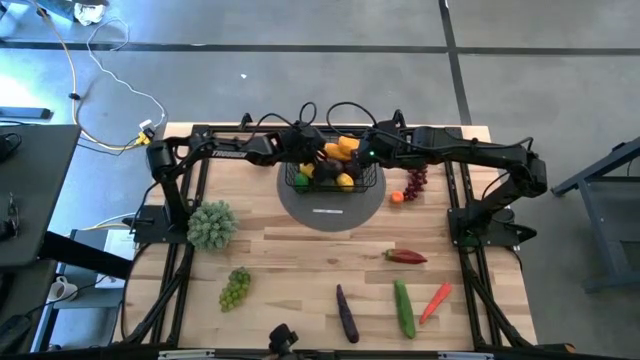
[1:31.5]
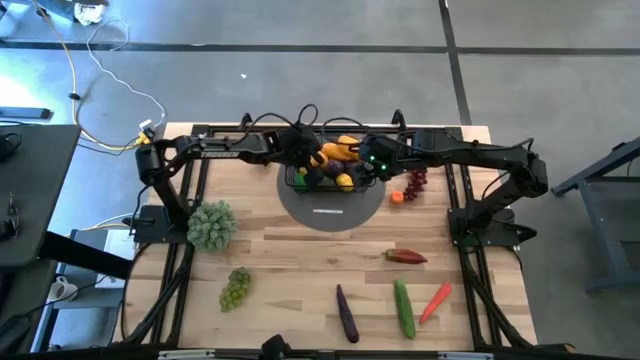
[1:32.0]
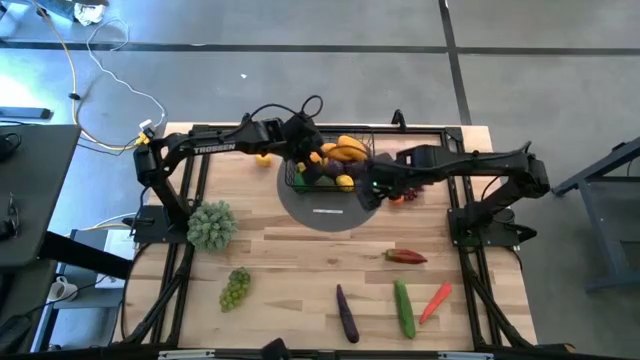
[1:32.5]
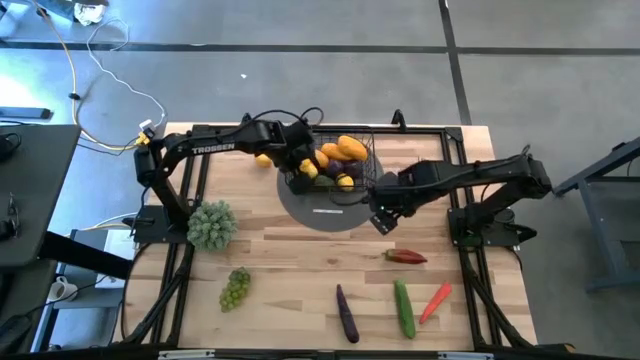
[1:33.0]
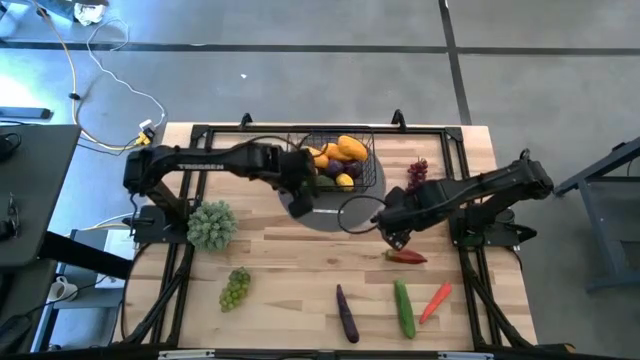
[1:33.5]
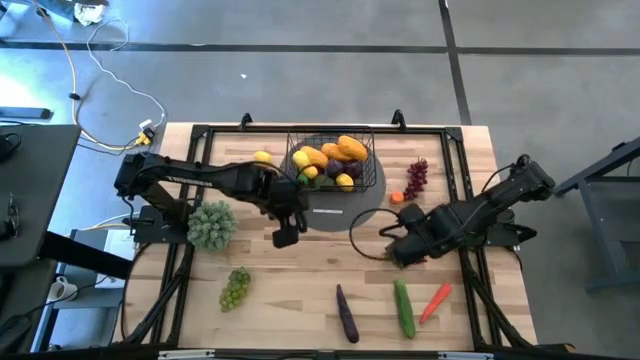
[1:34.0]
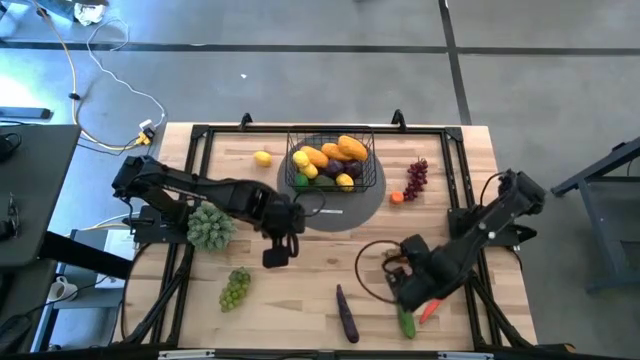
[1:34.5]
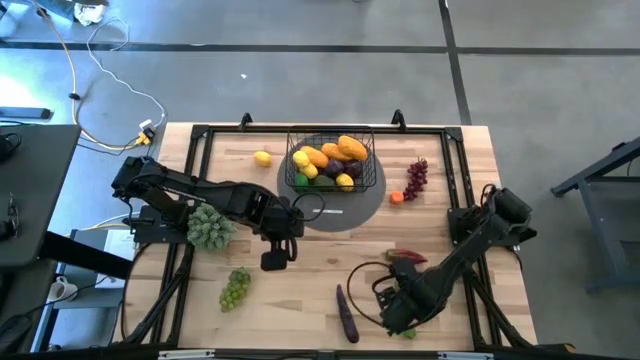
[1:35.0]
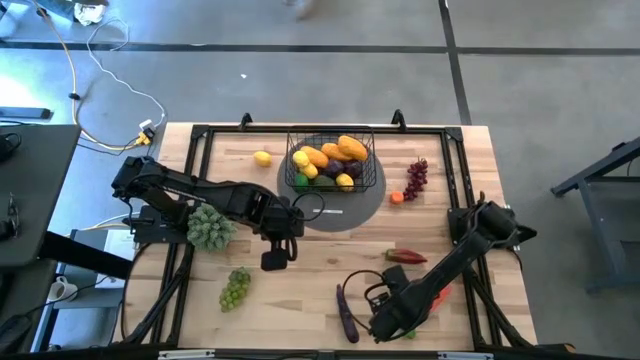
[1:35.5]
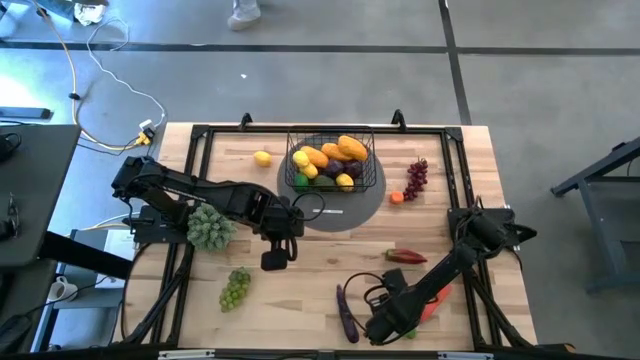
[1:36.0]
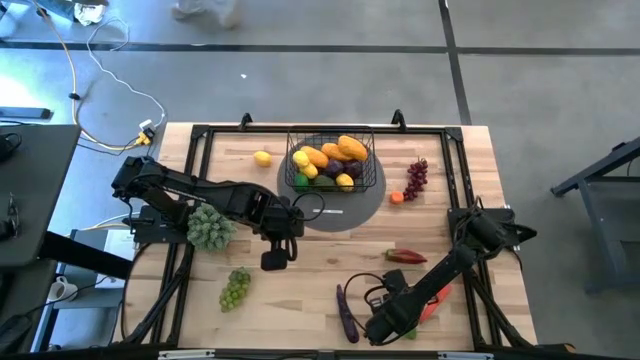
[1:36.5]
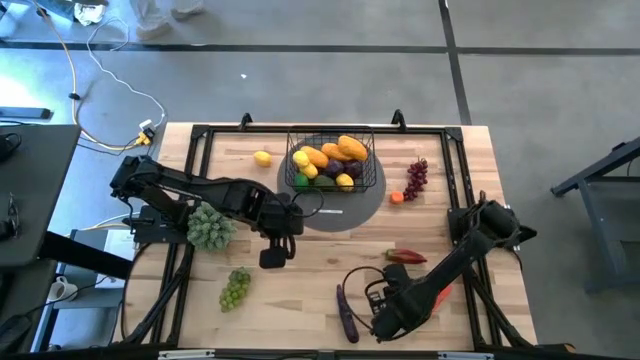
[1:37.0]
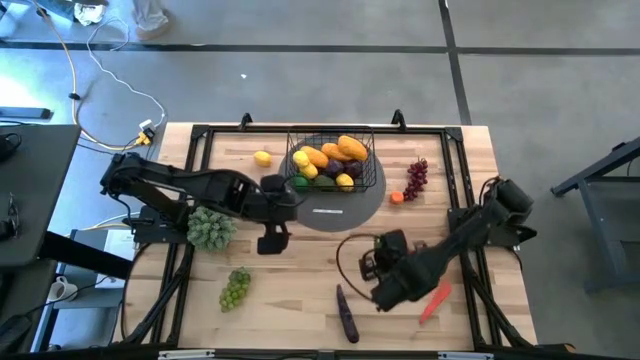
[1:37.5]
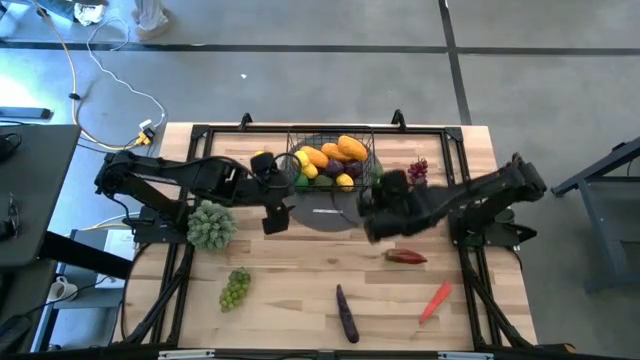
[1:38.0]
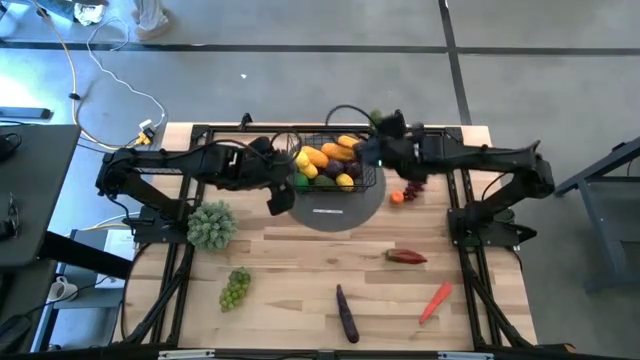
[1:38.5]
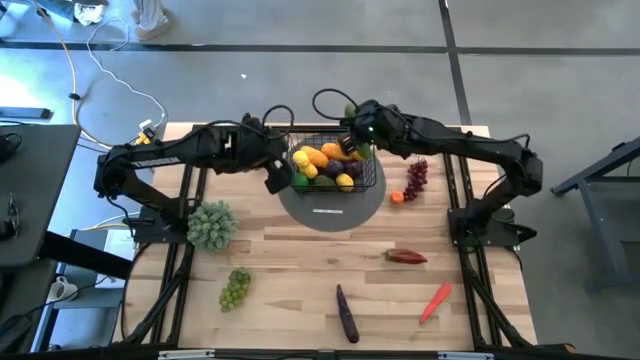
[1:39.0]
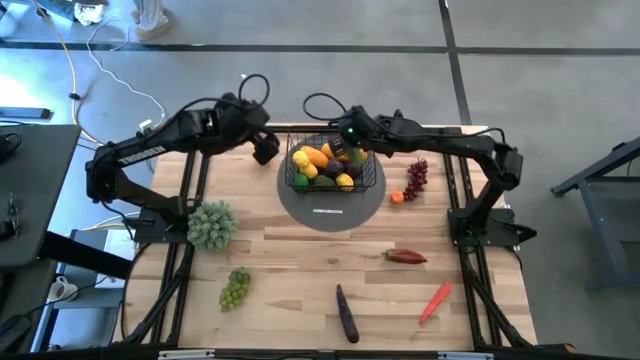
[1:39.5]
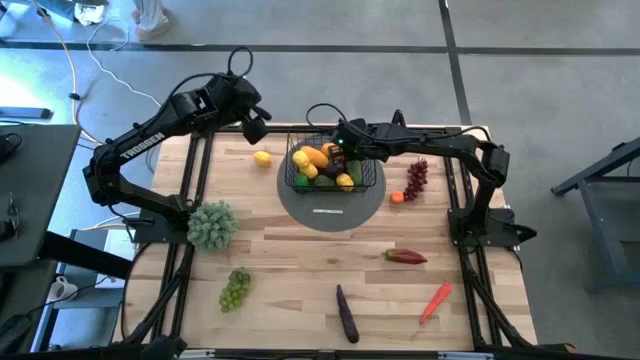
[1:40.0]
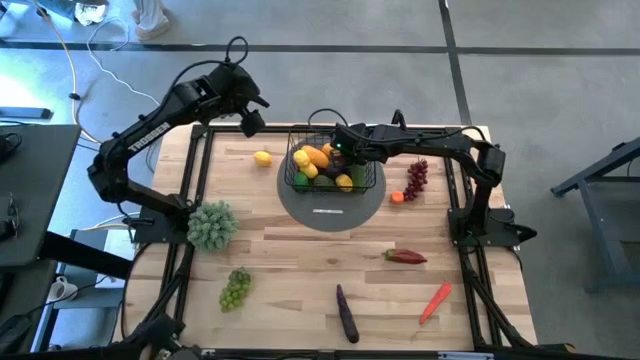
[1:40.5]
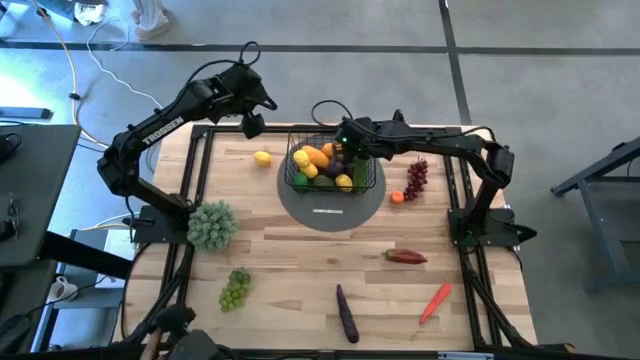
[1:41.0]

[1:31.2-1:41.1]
Task: Build produce basket
Put the green cucumber into the wire basket

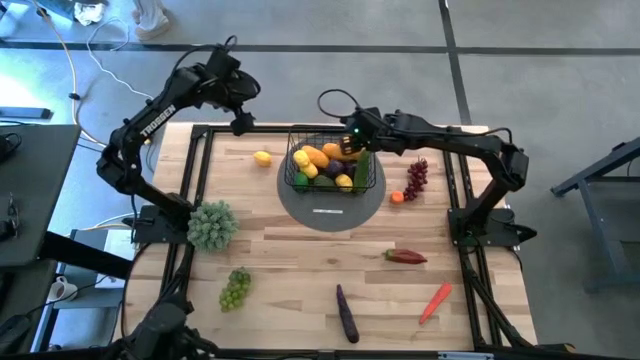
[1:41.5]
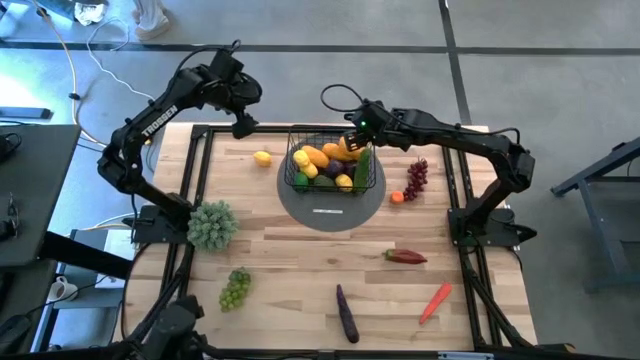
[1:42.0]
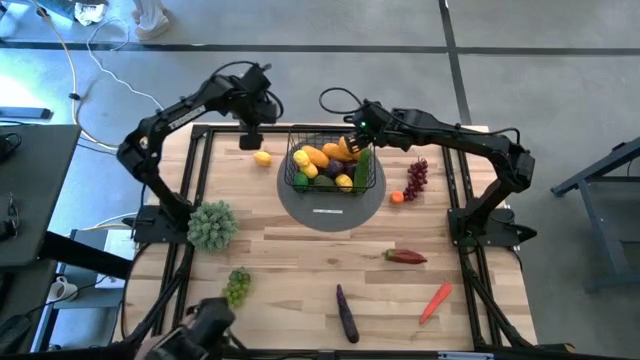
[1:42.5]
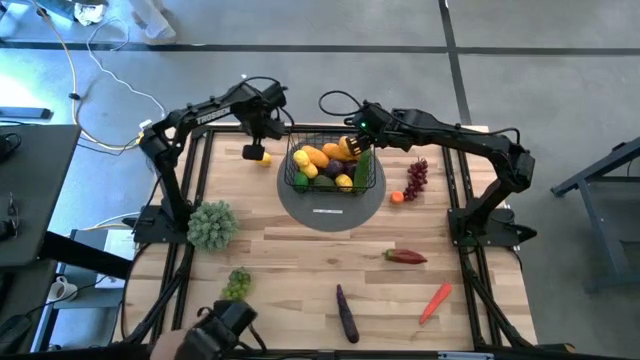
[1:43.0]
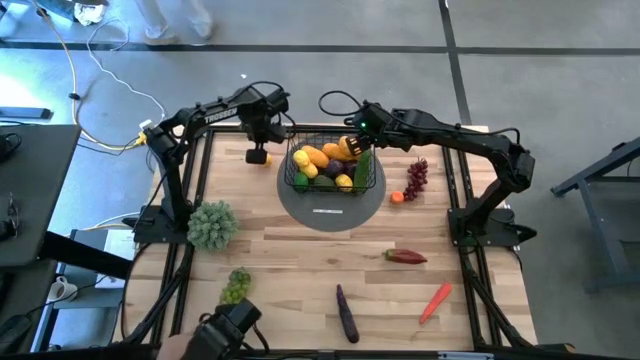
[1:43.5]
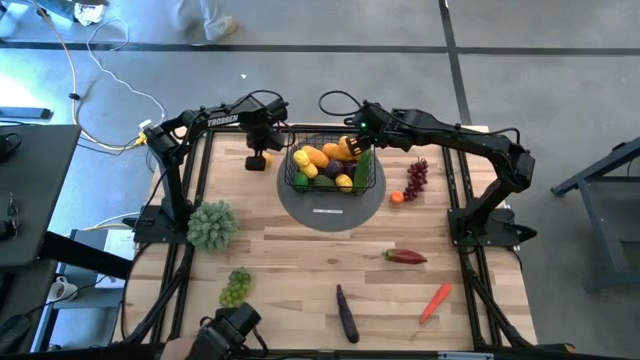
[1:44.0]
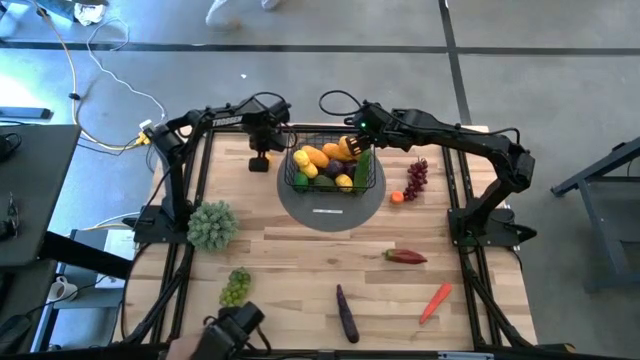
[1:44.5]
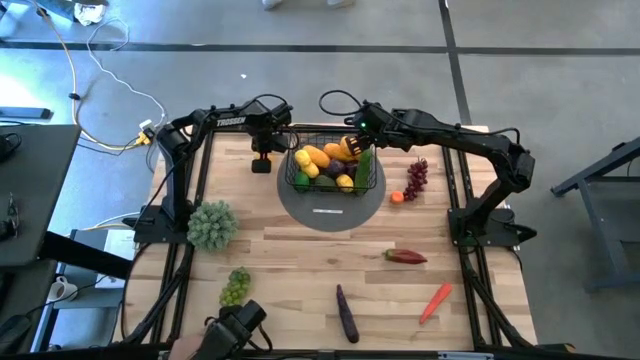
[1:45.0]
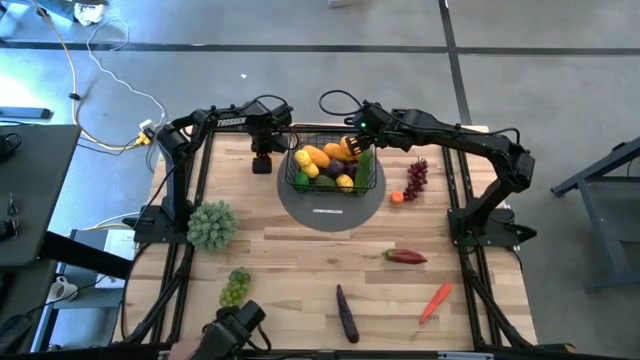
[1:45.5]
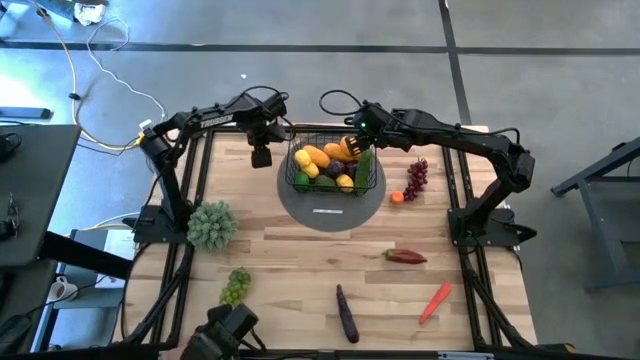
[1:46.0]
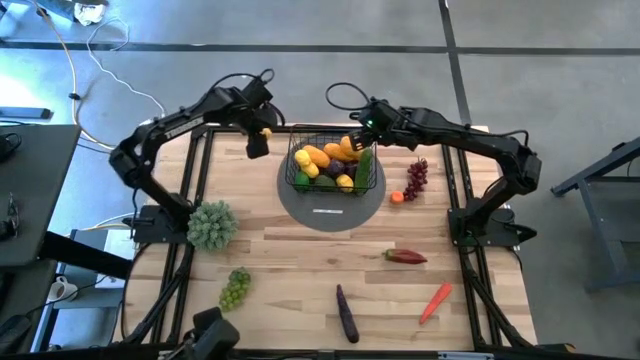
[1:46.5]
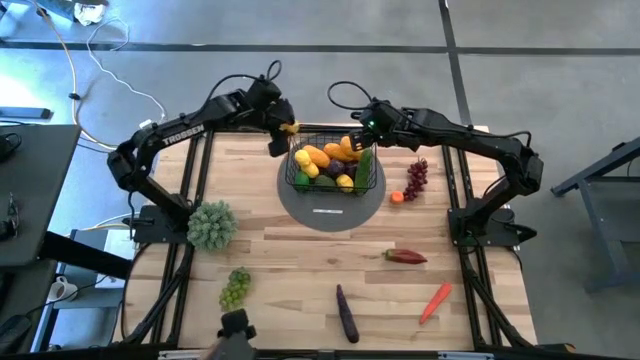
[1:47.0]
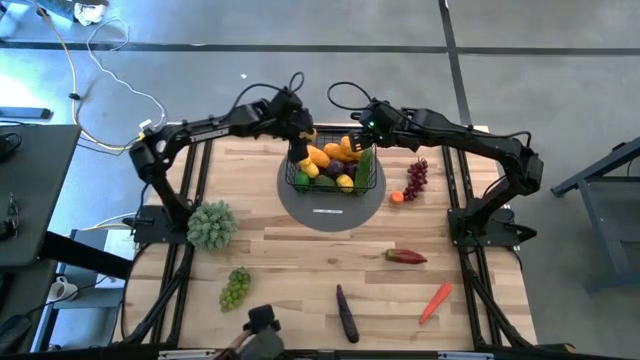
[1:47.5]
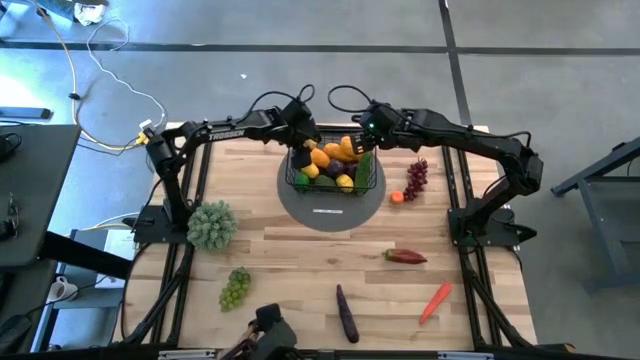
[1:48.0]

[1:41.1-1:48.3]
Put the yellow lemon into the wire basket

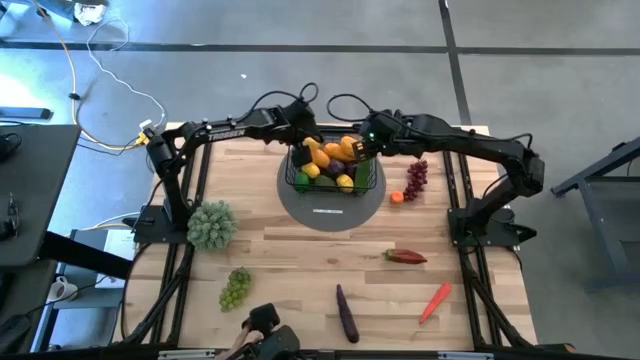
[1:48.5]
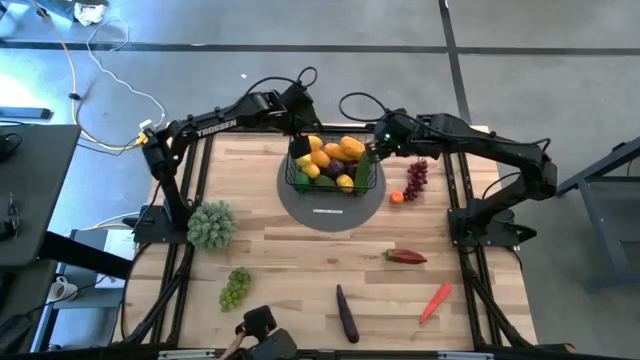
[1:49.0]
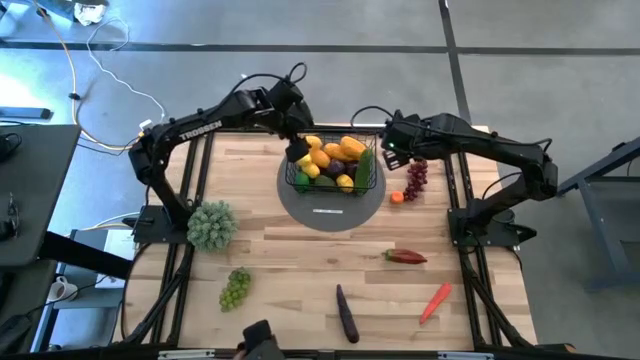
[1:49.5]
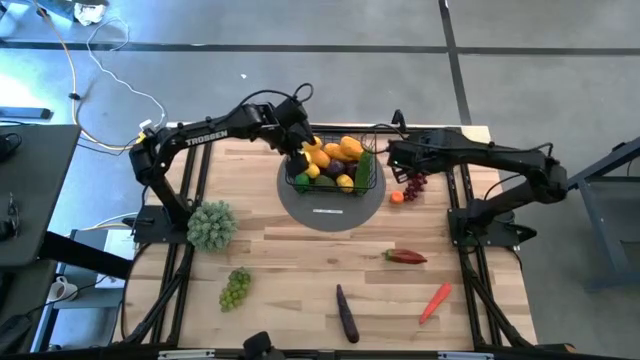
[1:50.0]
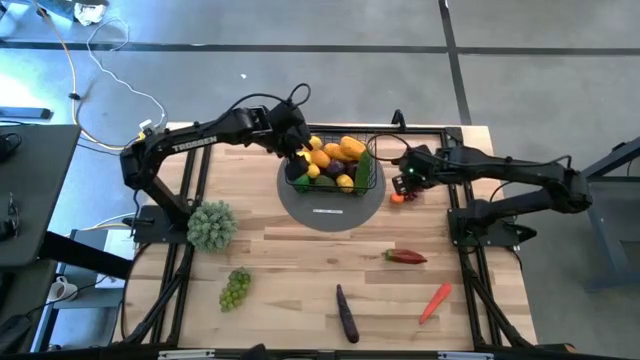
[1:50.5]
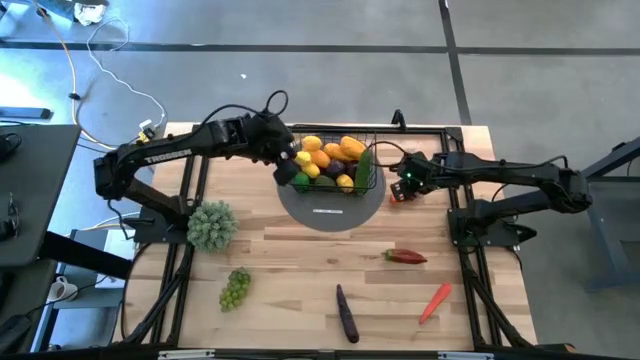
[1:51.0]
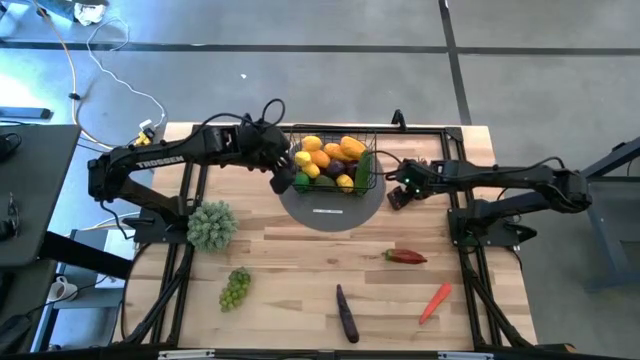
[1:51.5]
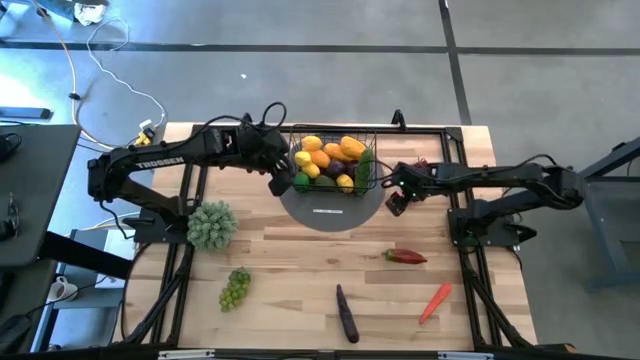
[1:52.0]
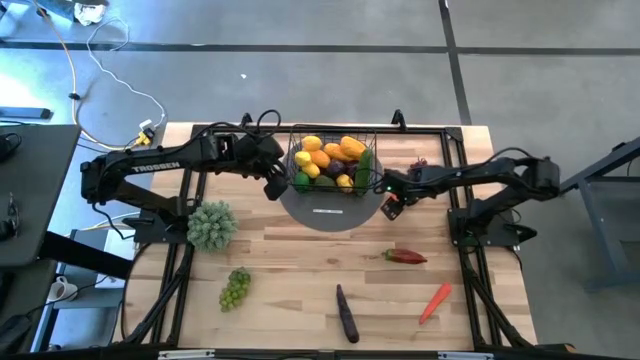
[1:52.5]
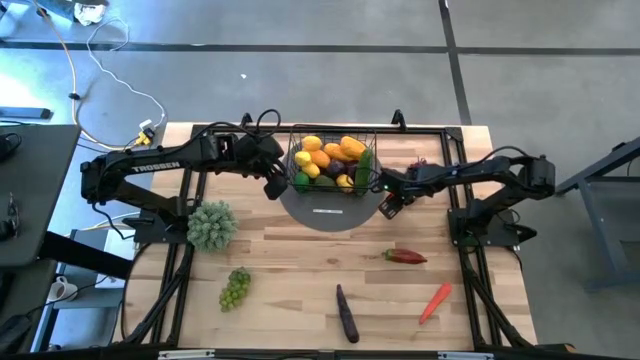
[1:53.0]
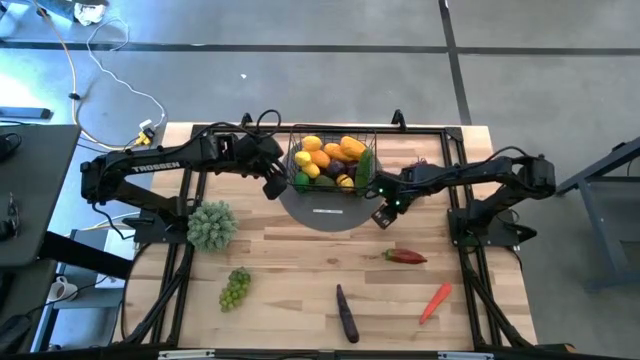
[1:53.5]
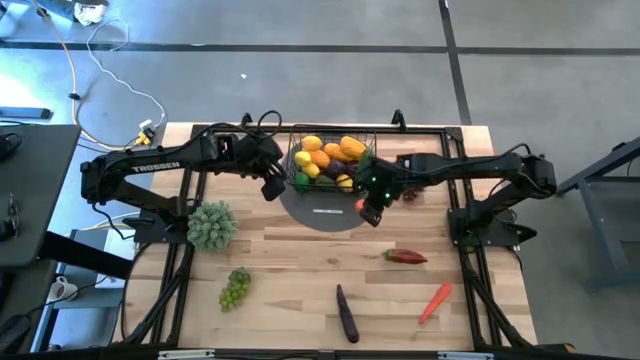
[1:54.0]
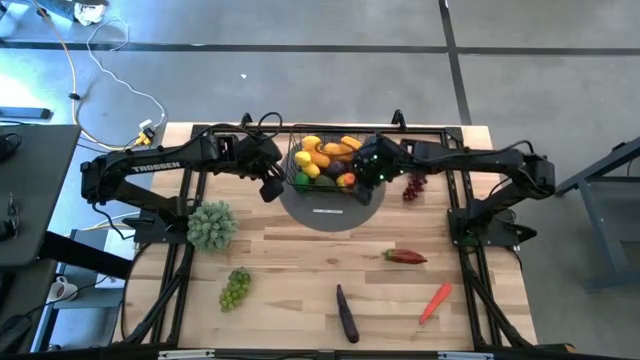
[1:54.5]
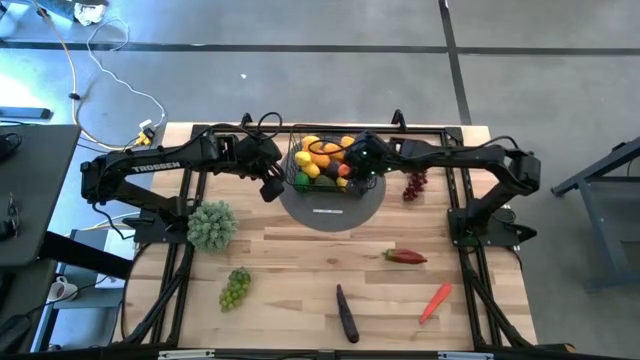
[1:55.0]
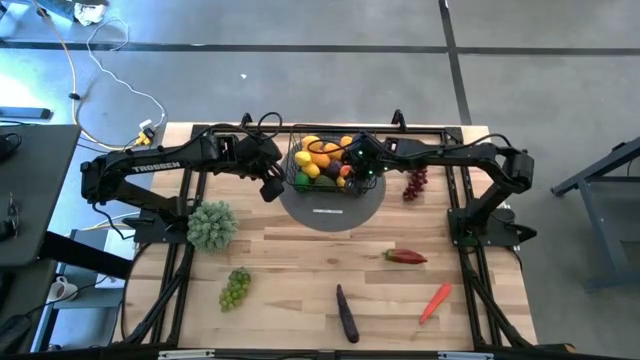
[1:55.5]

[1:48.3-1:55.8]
Put the orange into the wire basket
